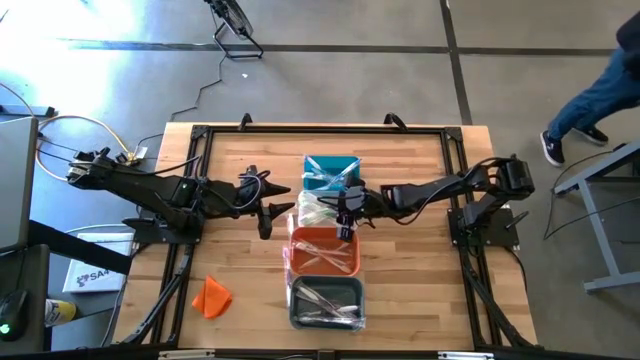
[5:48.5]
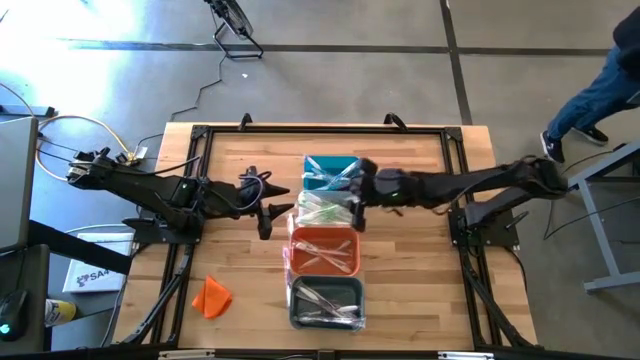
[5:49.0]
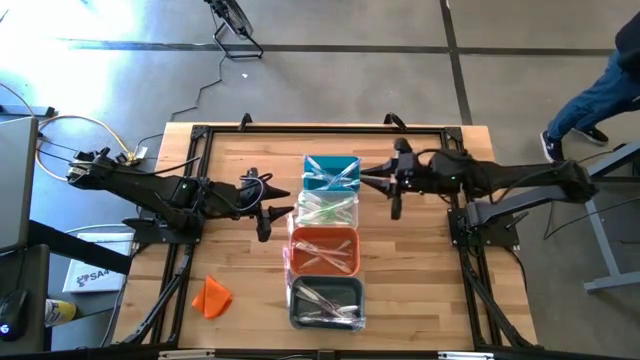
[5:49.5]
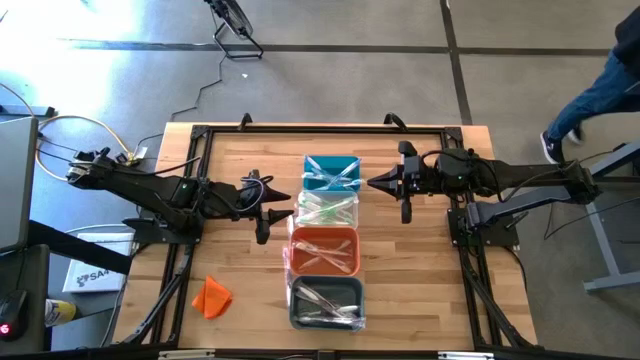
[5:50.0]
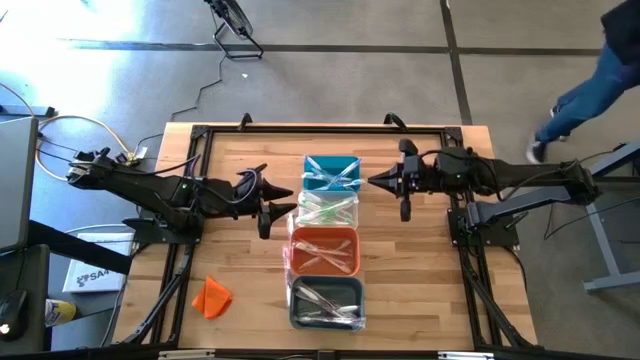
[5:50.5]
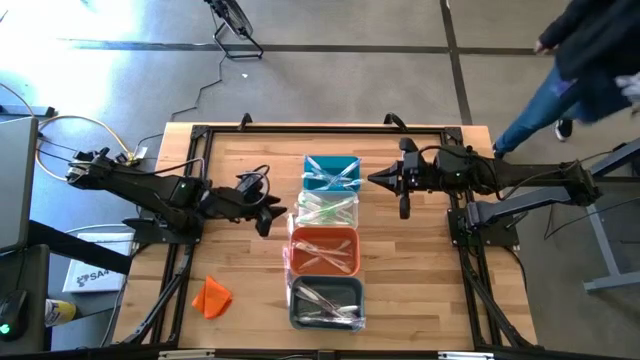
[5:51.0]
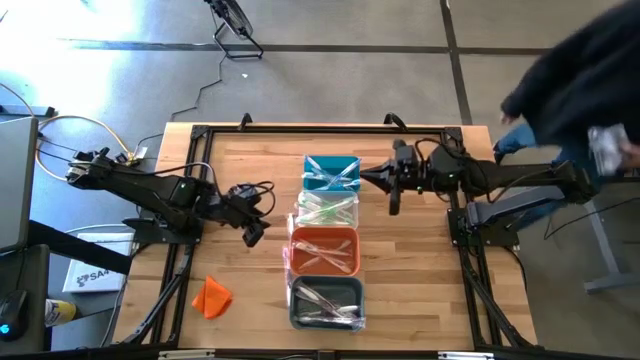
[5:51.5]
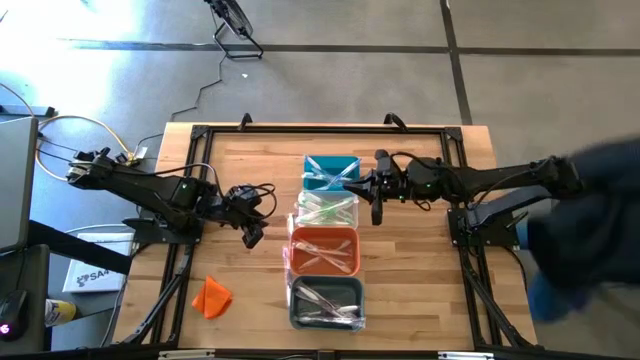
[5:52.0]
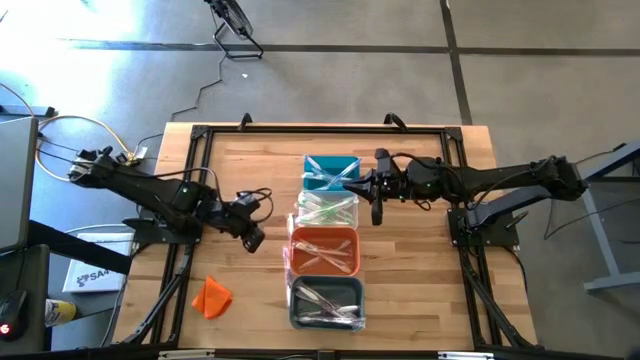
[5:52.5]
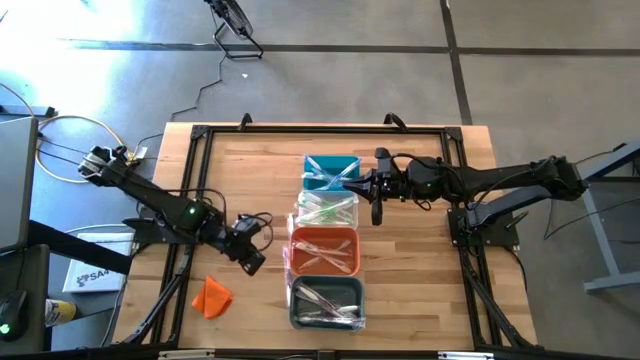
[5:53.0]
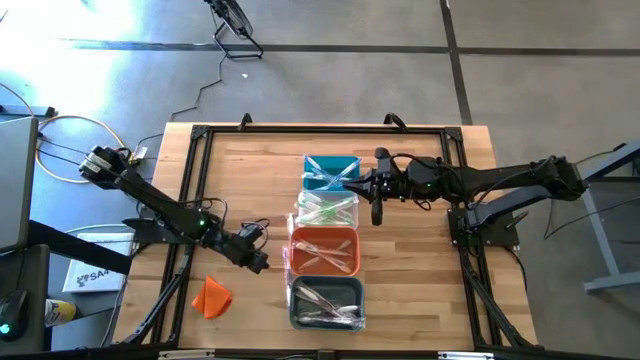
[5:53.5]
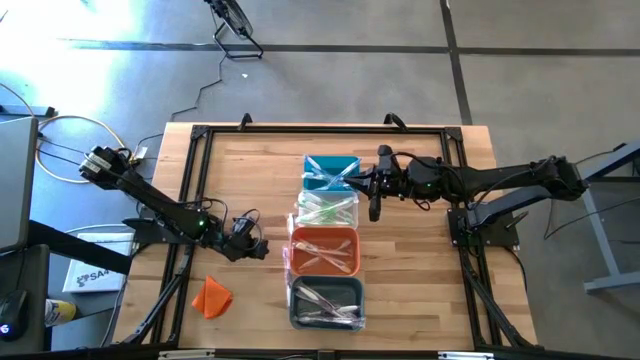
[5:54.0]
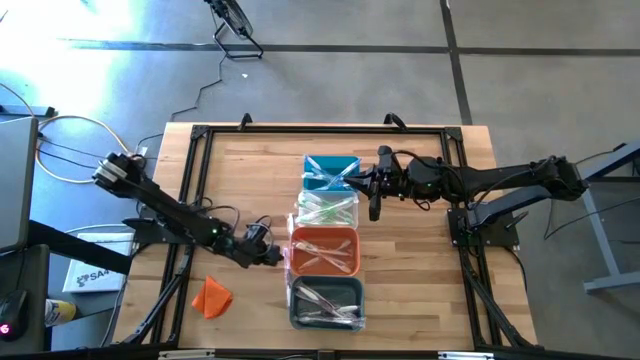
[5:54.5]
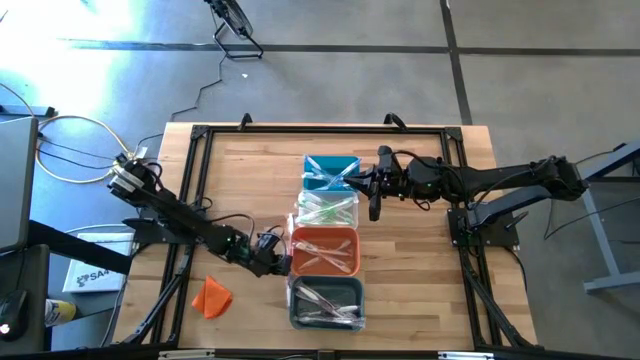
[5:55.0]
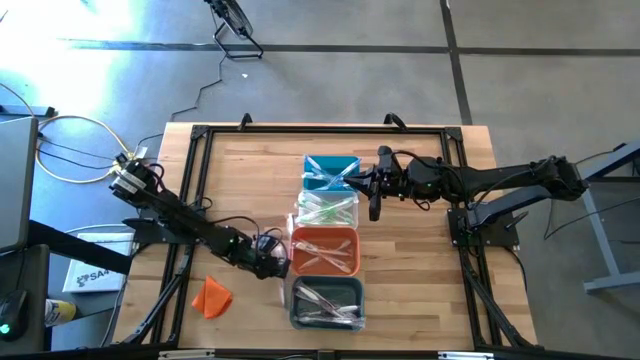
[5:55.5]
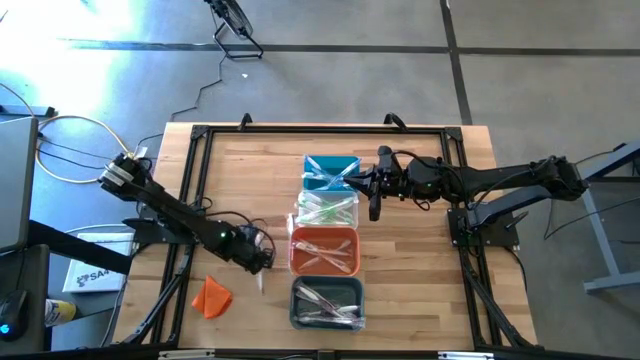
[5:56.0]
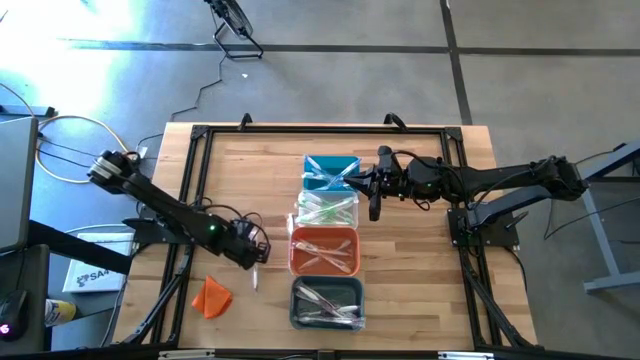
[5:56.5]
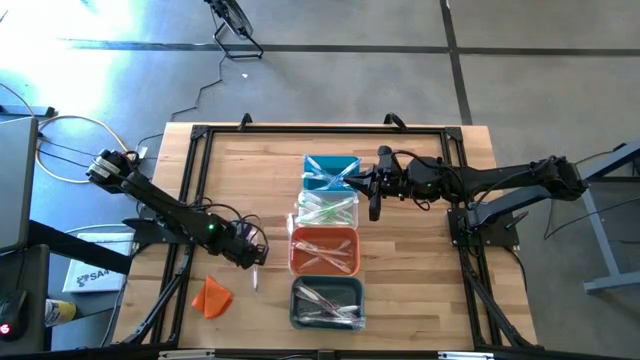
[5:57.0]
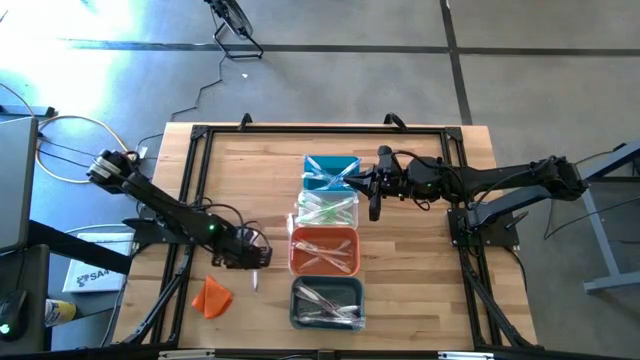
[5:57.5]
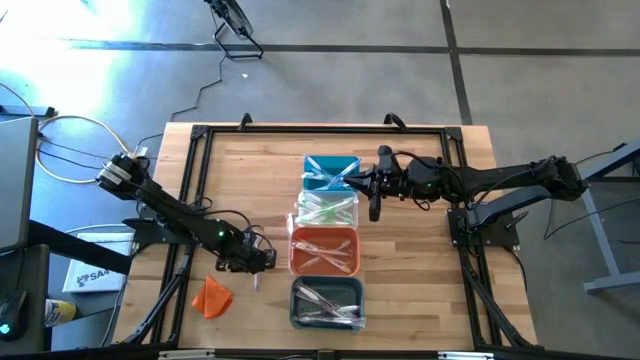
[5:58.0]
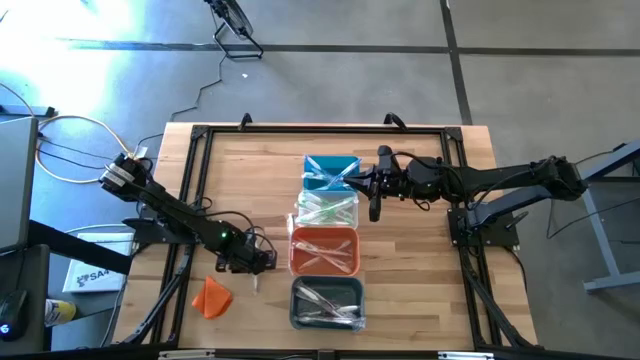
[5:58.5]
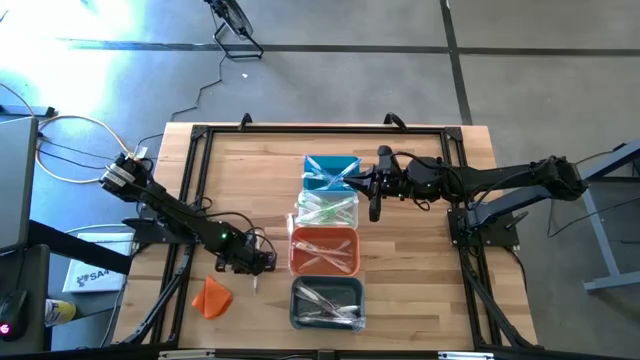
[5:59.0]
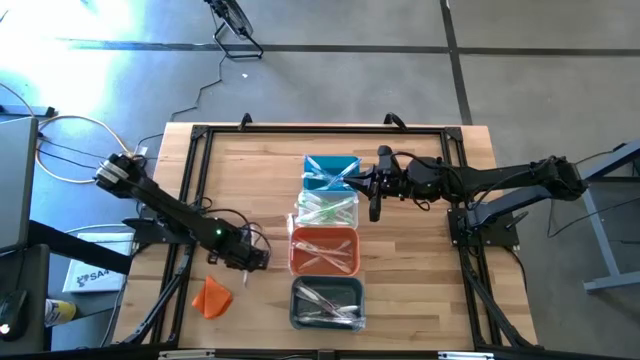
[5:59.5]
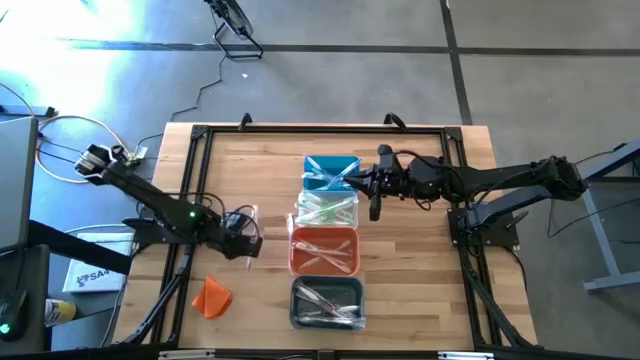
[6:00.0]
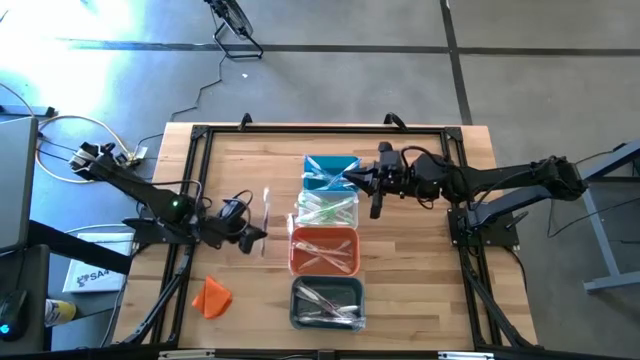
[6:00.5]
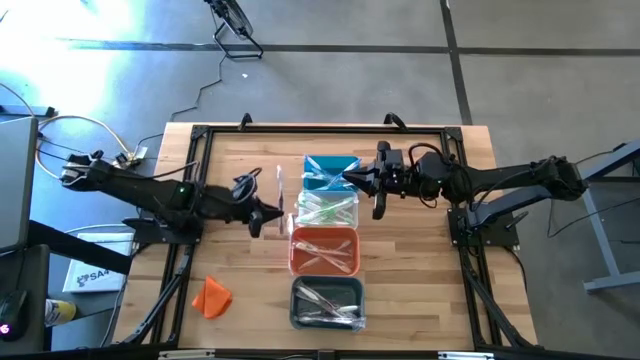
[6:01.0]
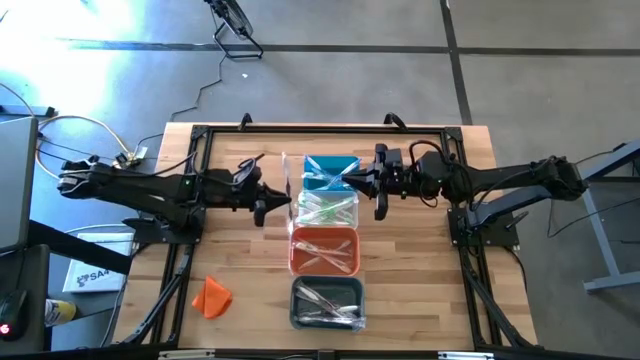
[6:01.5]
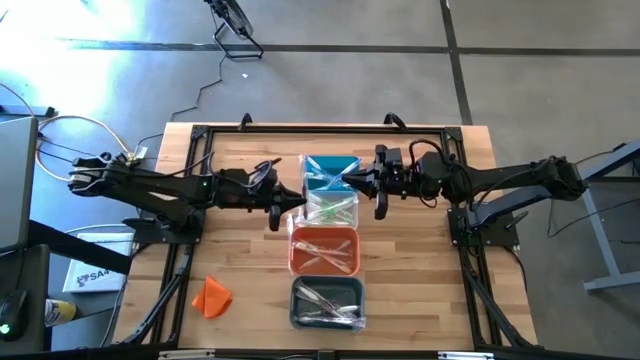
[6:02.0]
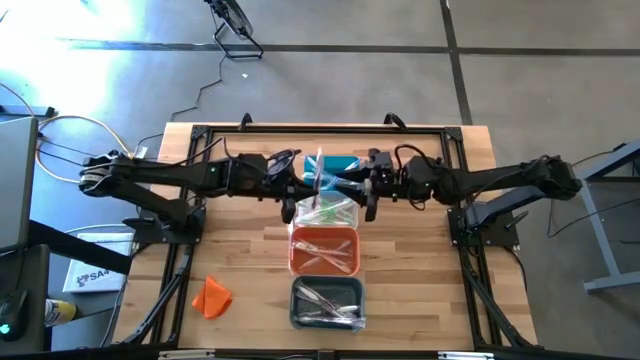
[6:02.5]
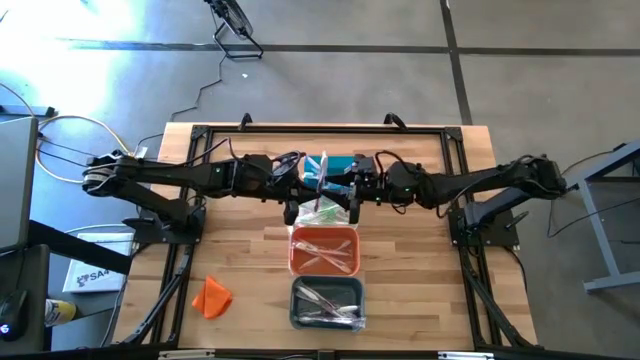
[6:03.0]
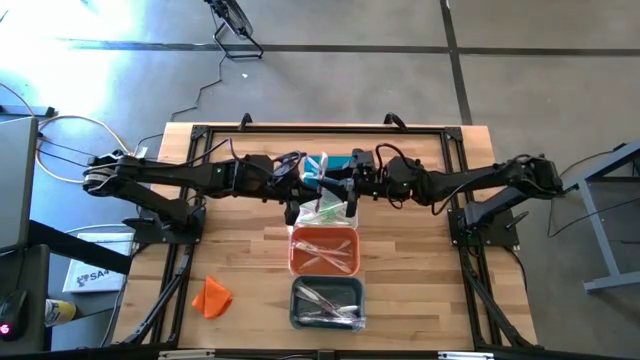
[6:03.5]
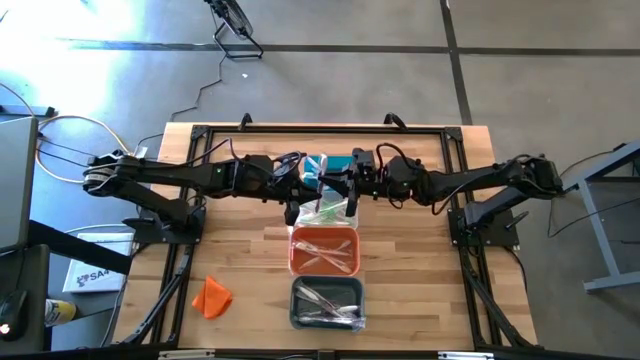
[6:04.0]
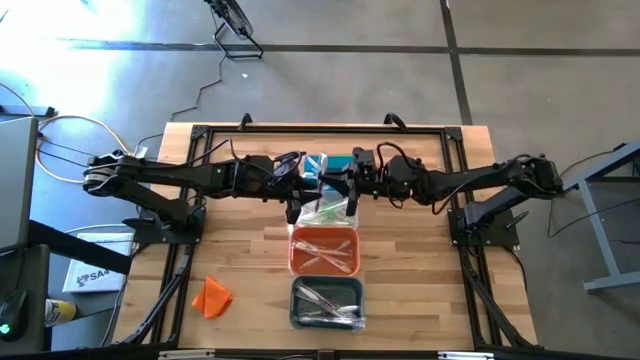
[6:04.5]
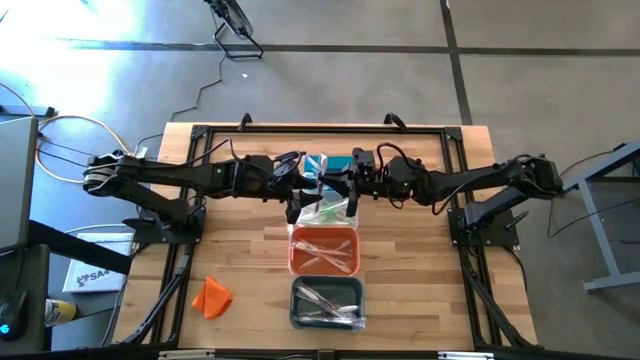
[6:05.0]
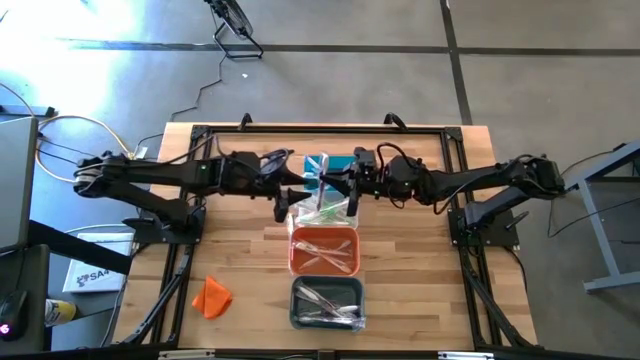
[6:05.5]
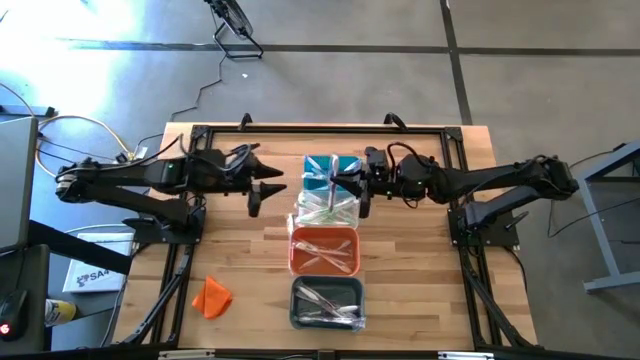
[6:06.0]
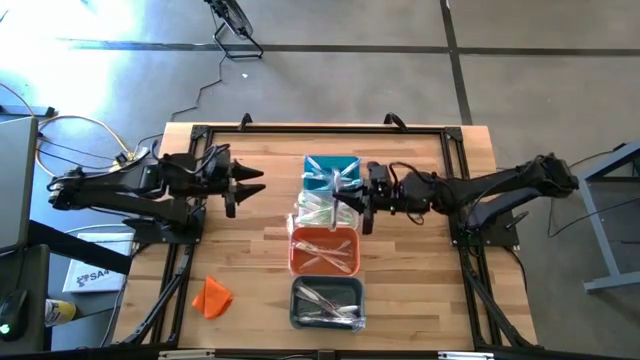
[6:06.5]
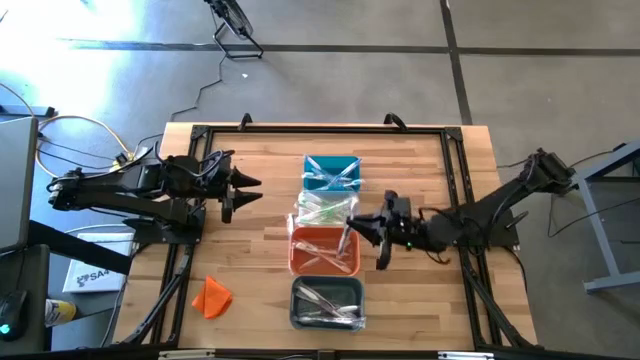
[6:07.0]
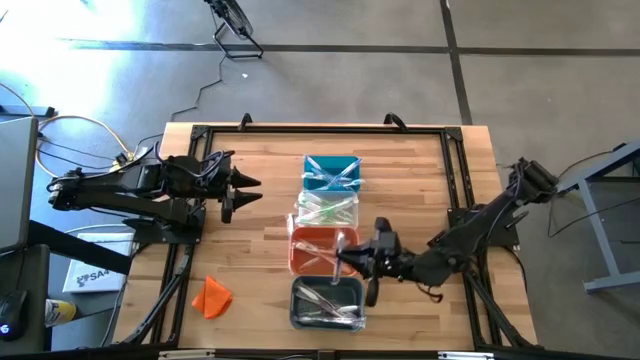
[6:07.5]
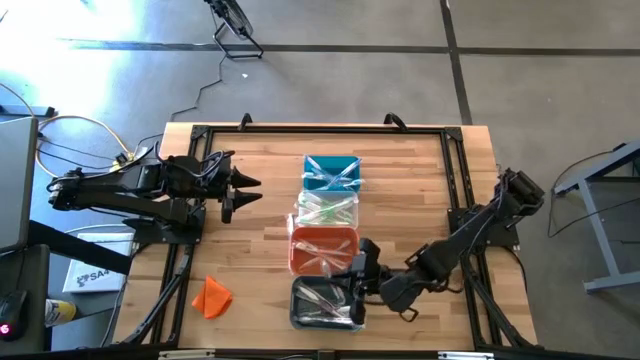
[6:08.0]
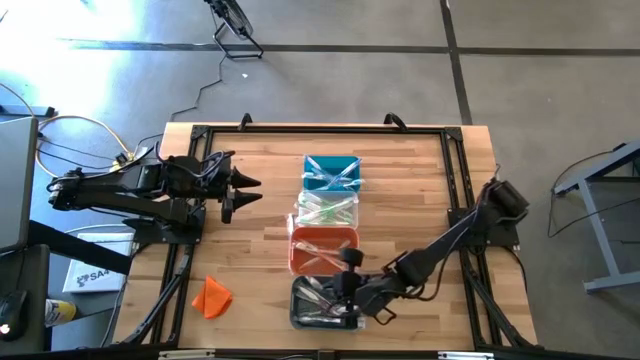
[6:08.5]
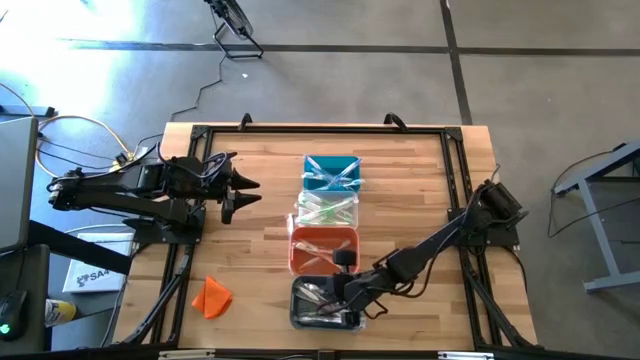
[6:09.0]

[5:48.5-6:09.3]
Task: Pick & Place Toothbrushes
Put the violet toothbrush into the green bin
